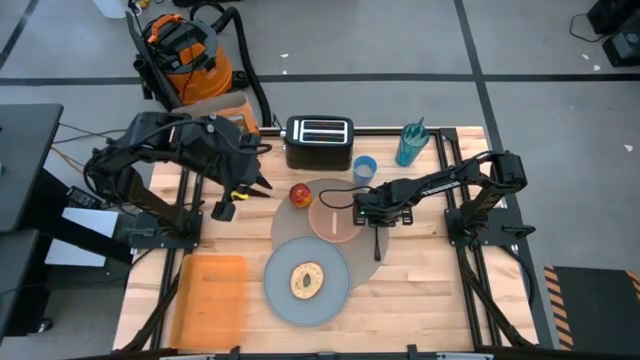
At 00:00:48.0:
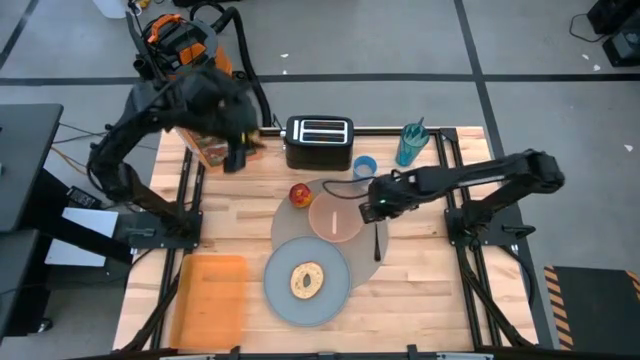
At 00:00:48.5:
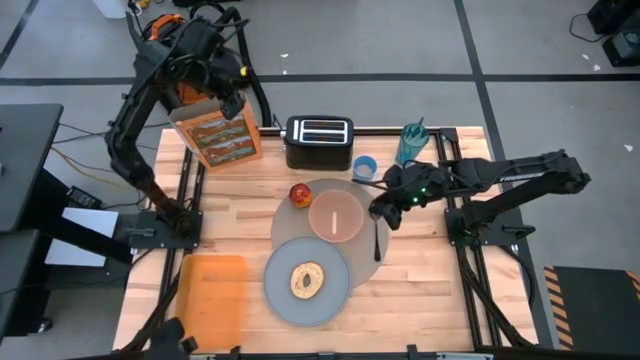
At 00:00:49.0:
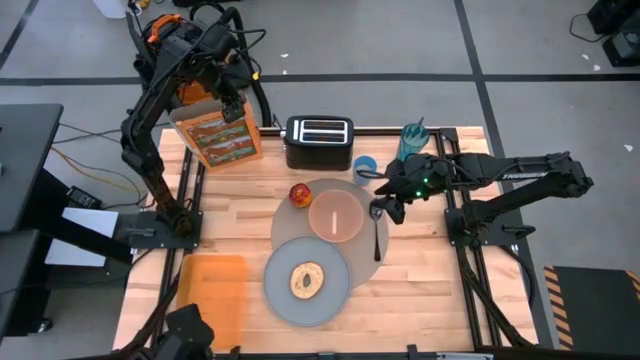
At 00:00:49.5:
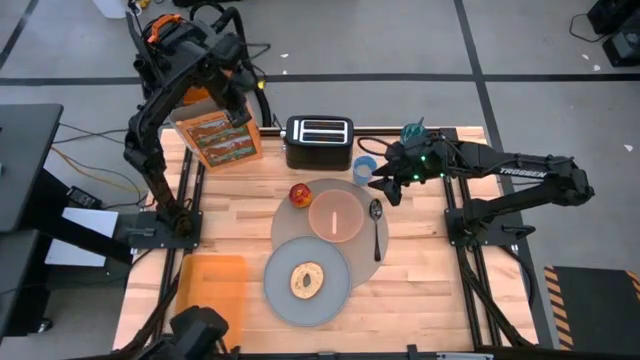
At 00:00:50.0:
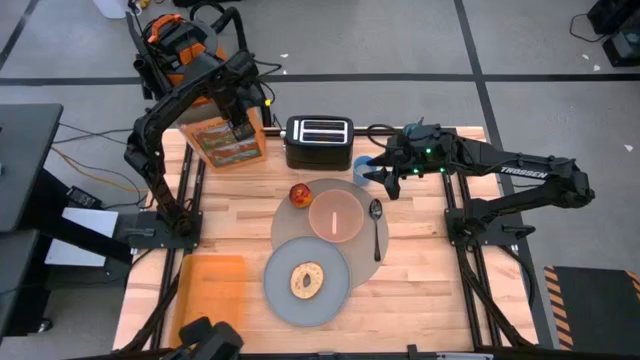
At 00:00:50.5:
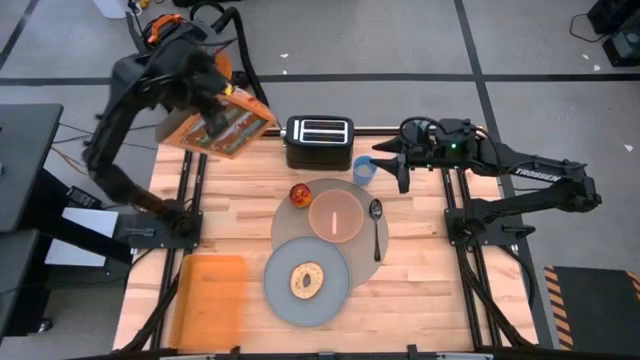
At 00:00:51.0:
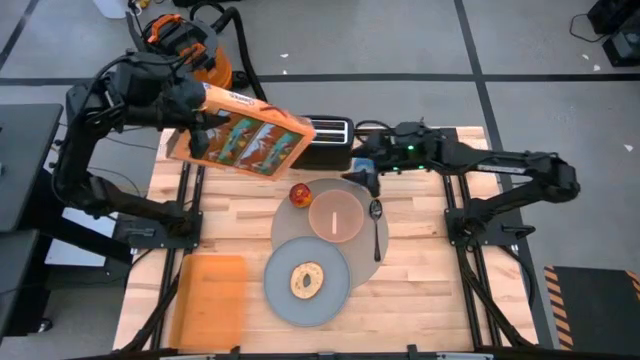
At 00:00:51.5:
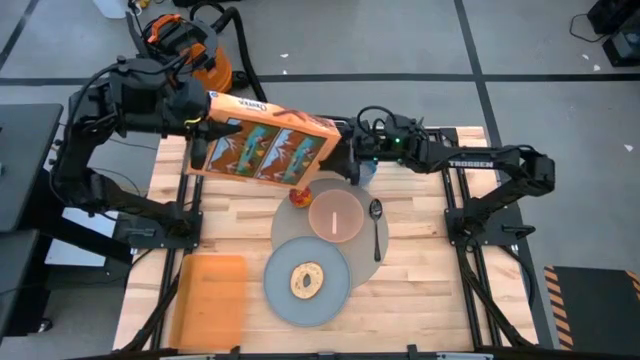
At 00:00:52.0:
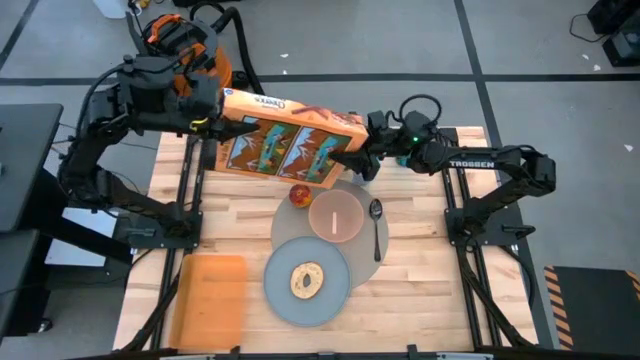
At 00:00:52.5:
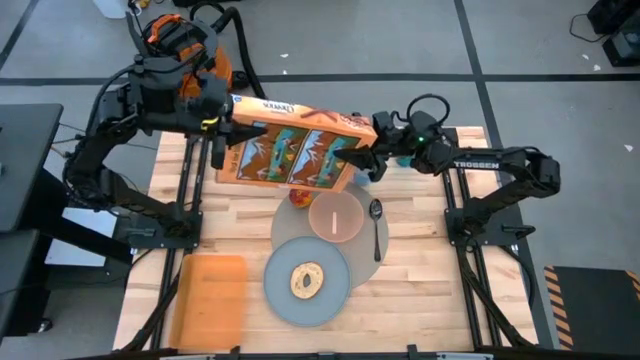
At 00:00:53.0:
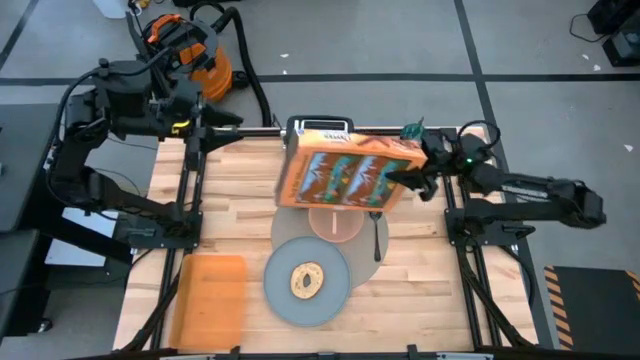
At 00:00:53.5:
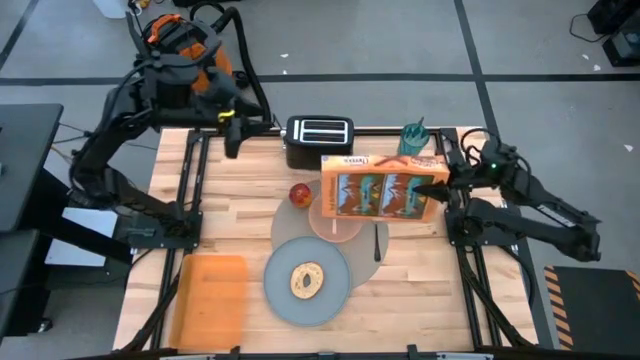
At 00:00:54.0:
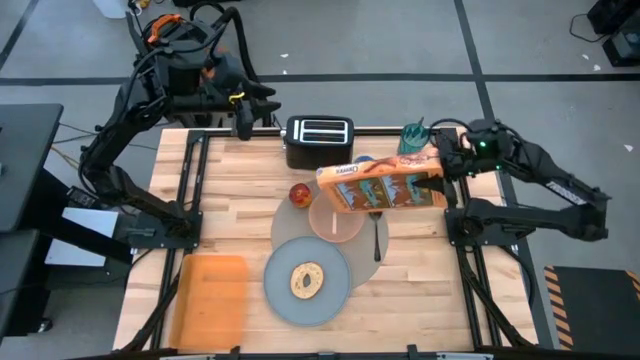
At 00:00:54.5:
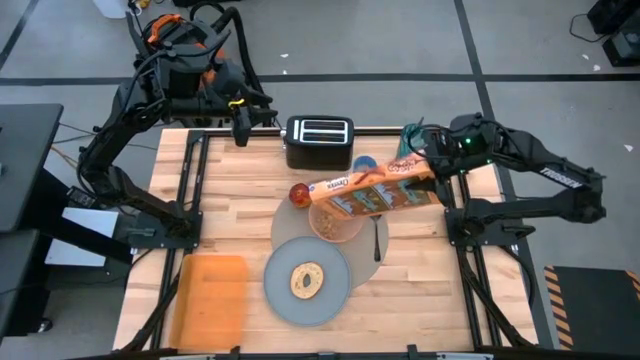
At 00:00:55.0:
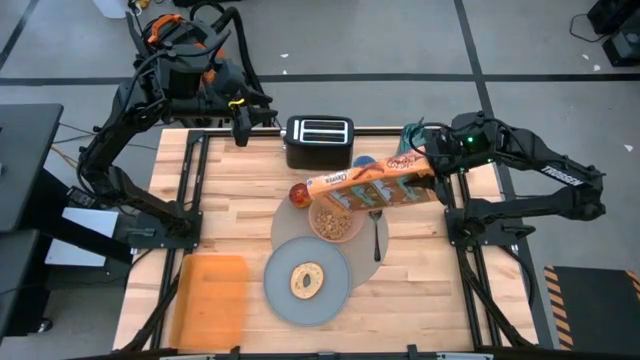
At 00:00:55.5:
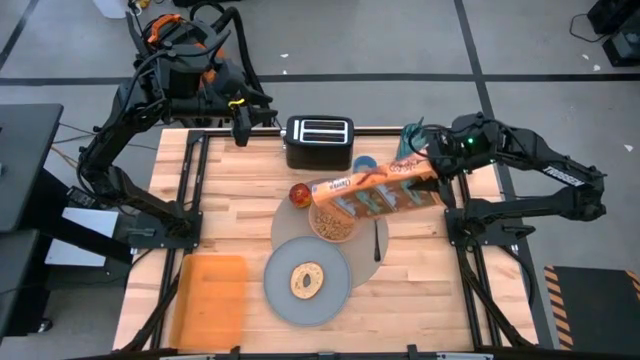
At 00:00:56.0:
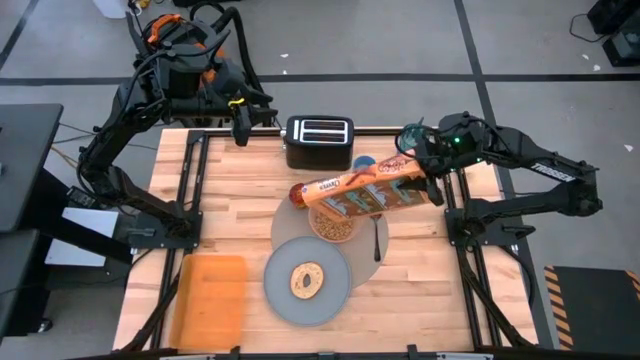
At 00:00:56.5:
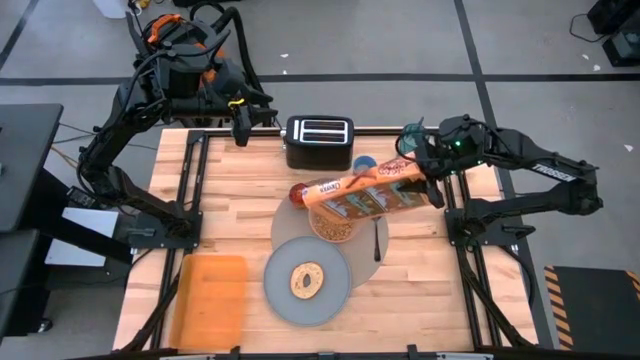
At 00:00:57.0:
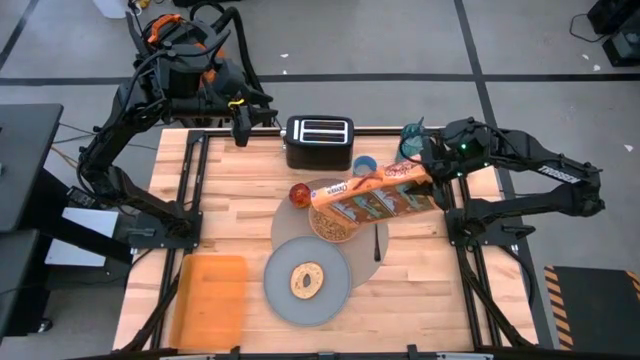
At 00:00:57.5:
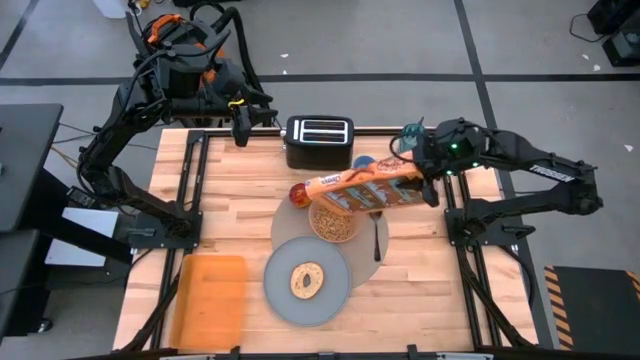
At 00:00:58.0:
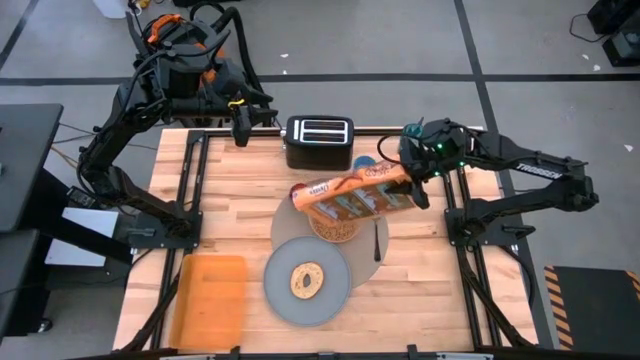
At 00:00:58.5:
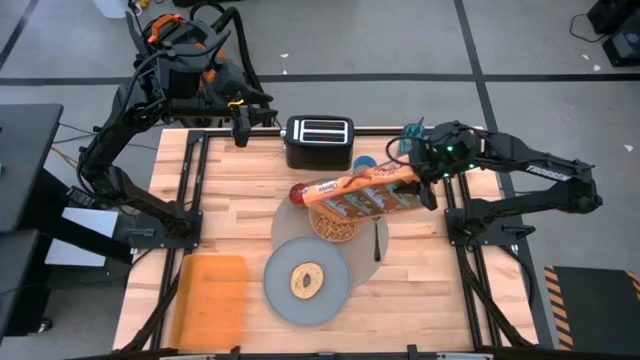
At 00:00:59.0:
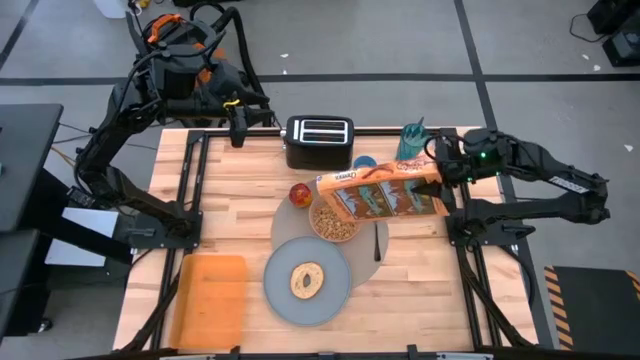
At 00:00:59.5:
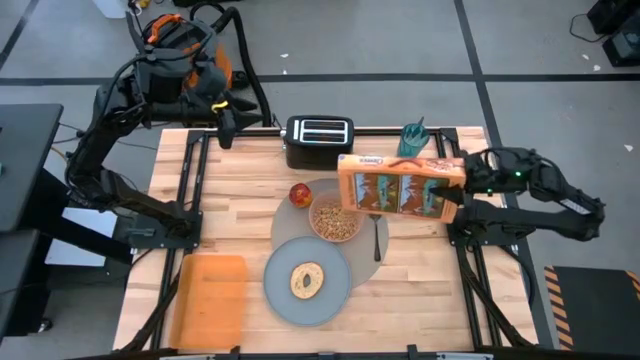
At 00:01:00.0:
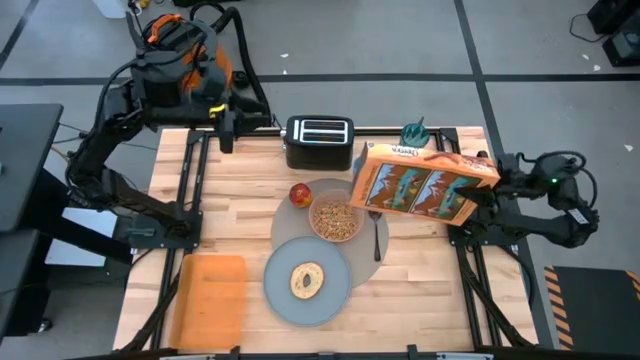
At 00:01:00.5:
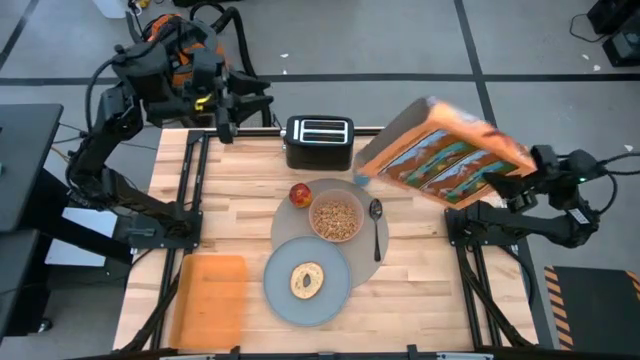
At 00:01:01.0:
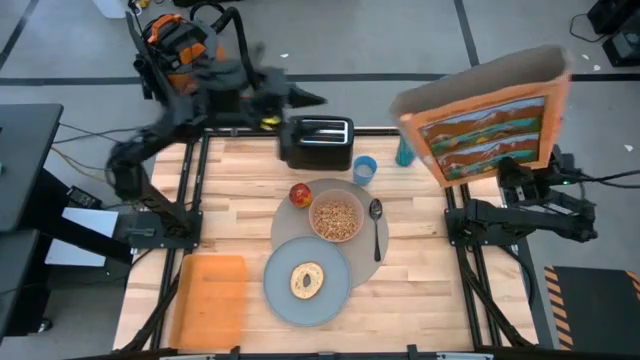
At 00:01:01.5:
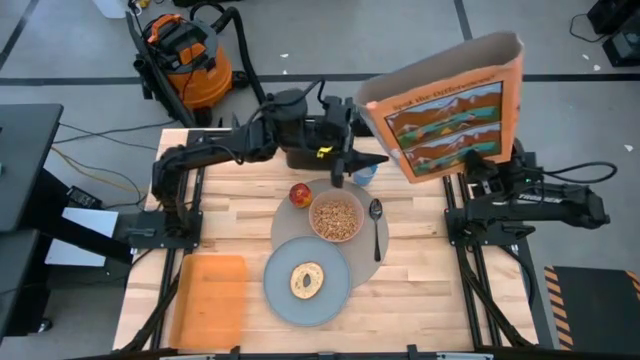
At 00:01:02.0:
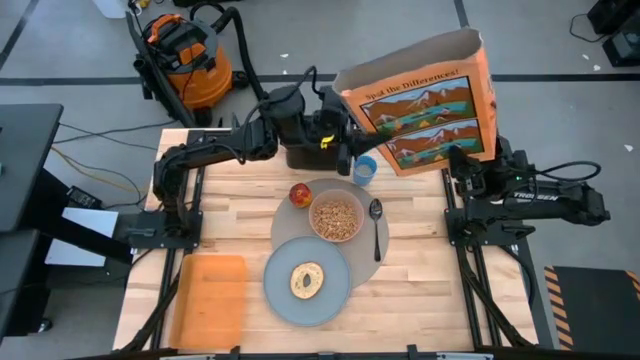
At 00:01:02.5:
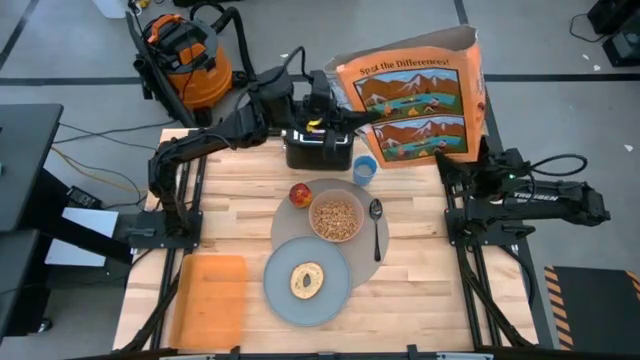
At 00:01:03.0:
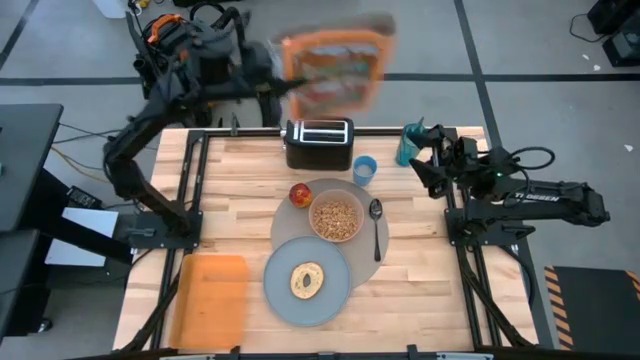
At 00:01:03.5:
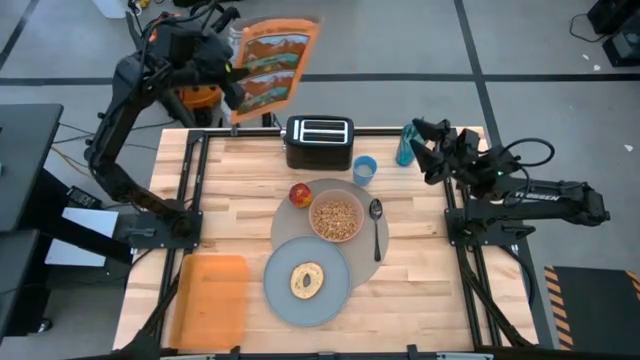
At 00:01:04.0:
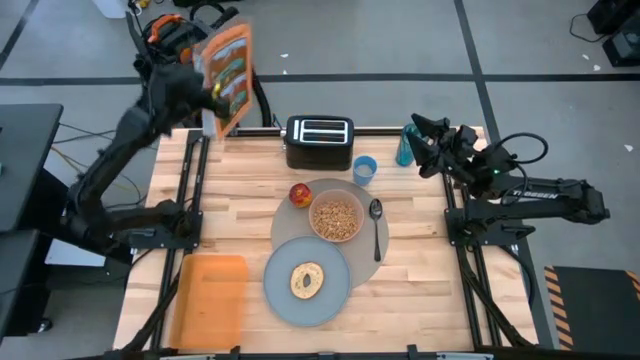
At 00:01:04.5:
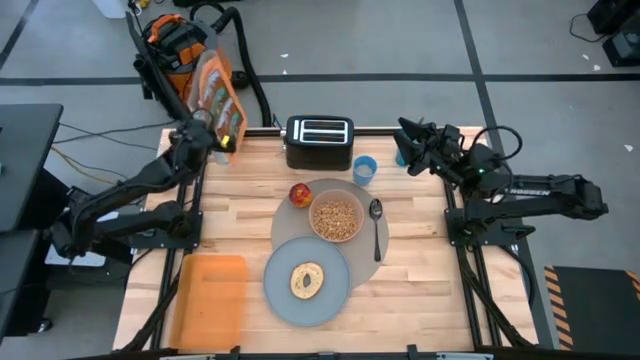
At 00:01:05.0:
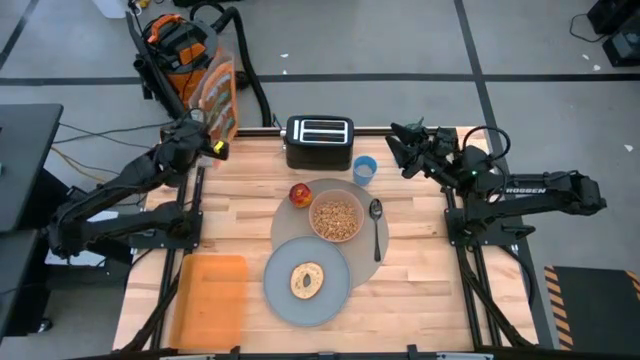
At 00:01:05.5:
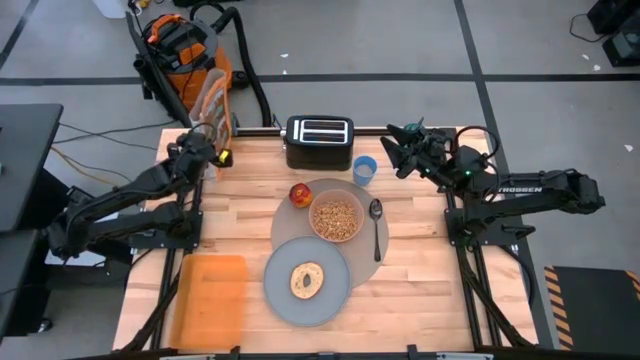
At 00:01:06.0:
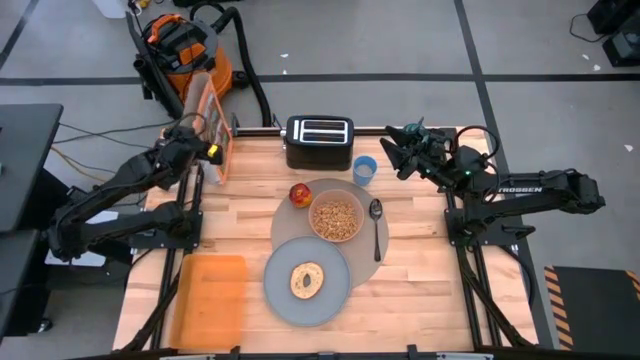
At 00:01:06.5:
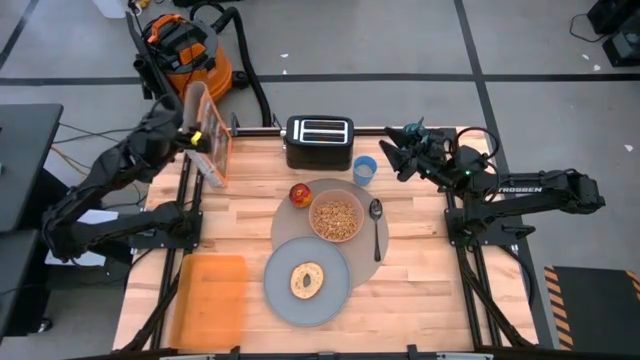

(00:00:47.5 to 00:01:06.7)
Task: Arrange a breakfast setting
Pour the yellow cereal into the light orange bowl
